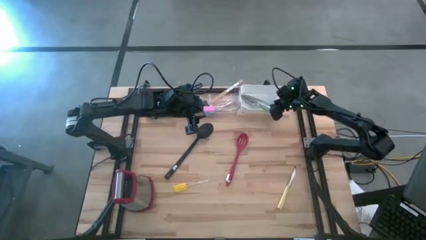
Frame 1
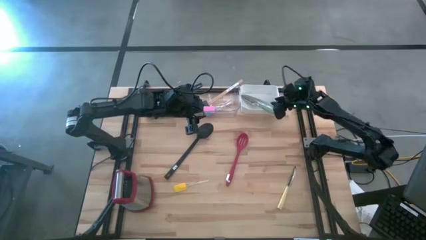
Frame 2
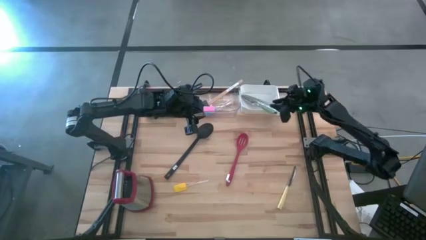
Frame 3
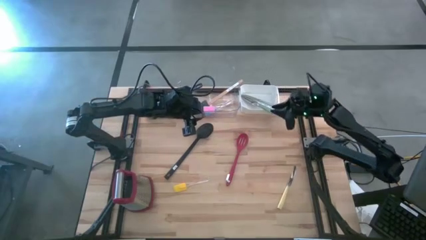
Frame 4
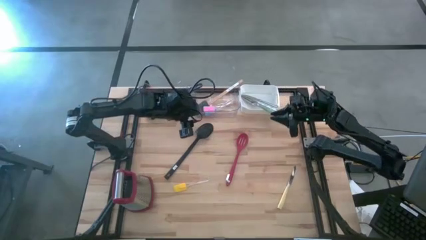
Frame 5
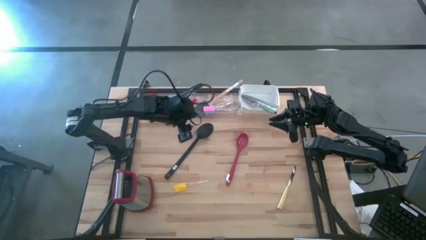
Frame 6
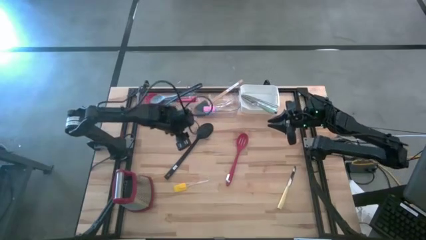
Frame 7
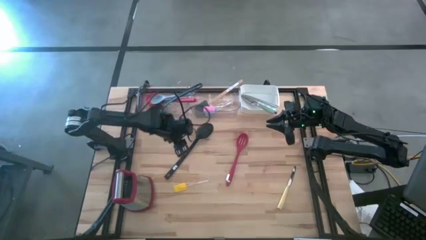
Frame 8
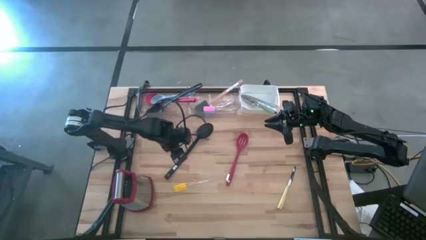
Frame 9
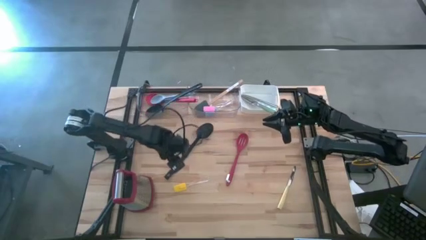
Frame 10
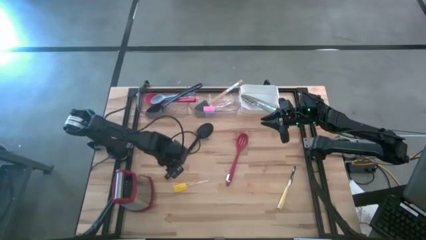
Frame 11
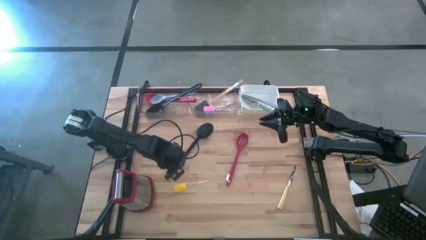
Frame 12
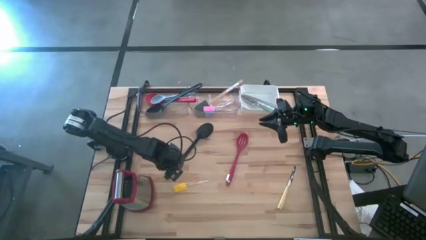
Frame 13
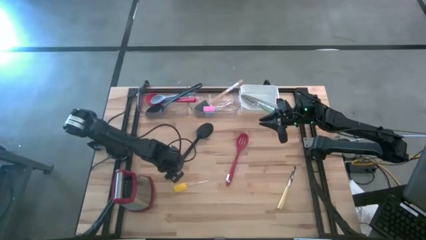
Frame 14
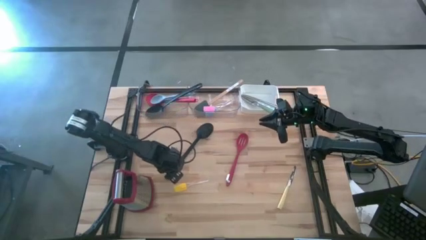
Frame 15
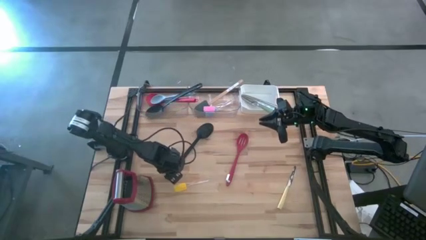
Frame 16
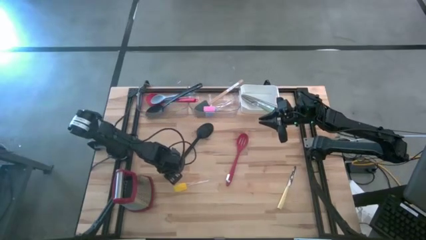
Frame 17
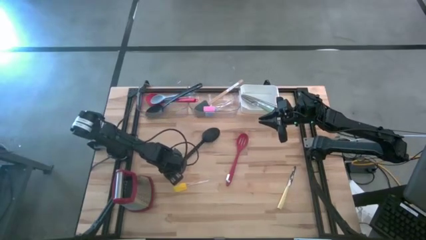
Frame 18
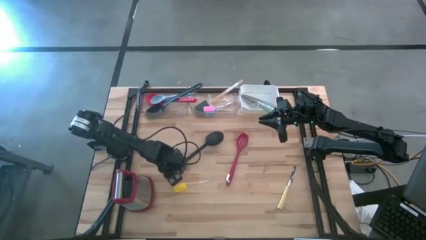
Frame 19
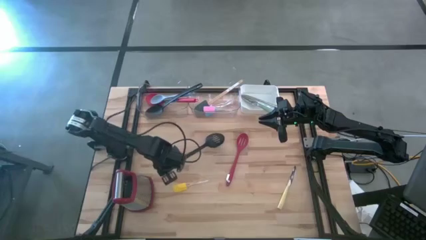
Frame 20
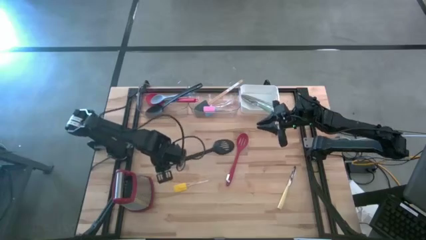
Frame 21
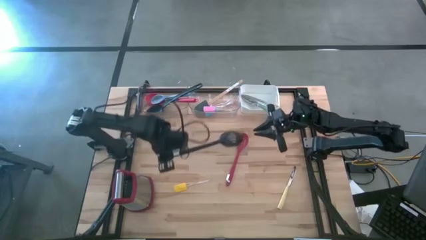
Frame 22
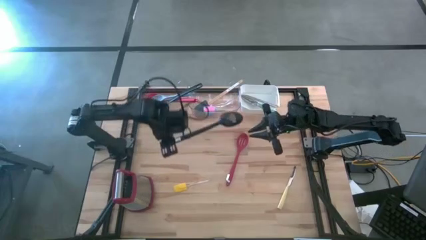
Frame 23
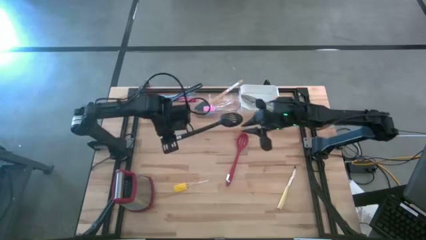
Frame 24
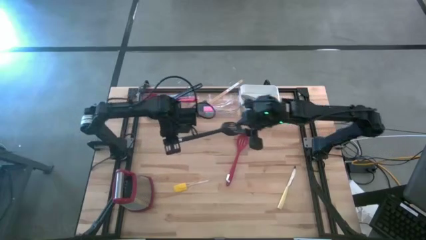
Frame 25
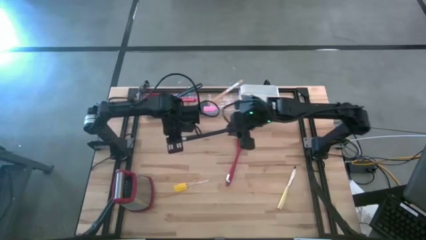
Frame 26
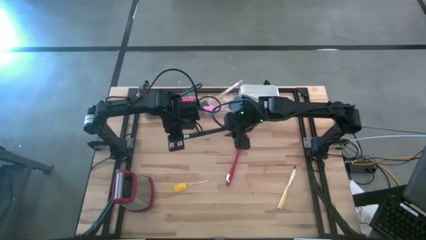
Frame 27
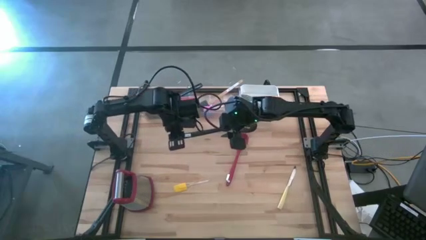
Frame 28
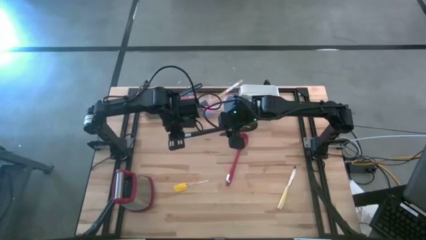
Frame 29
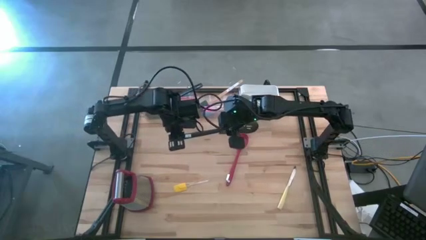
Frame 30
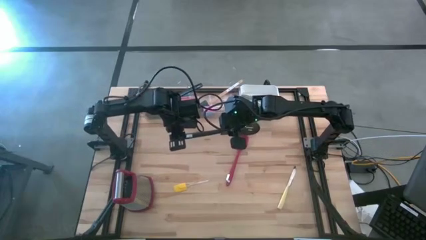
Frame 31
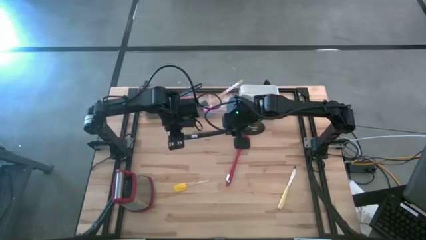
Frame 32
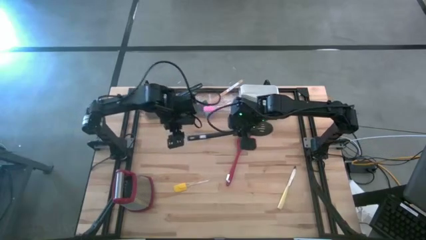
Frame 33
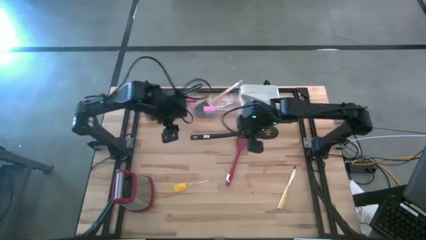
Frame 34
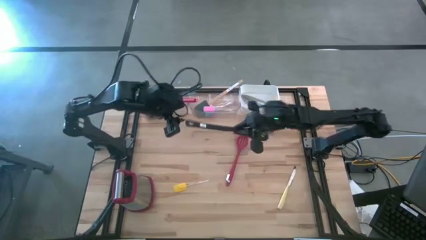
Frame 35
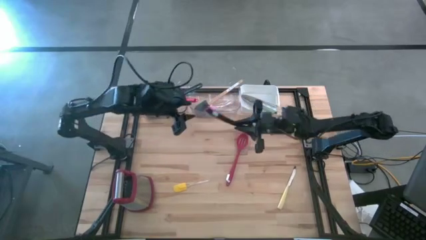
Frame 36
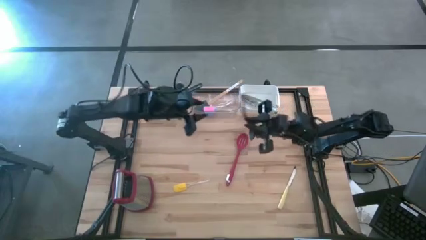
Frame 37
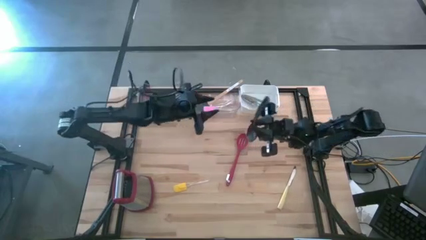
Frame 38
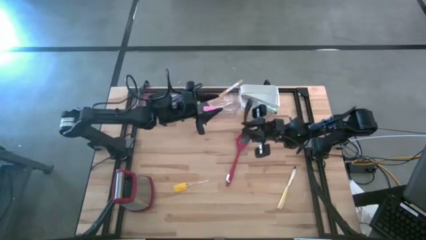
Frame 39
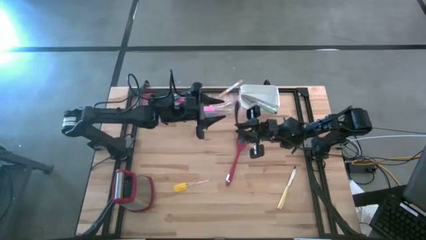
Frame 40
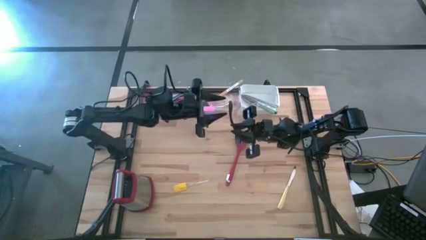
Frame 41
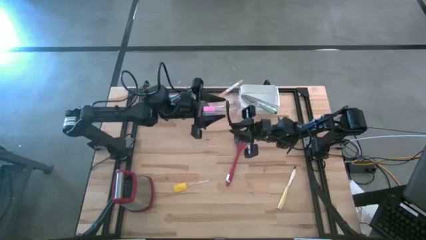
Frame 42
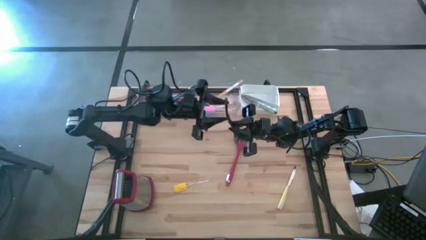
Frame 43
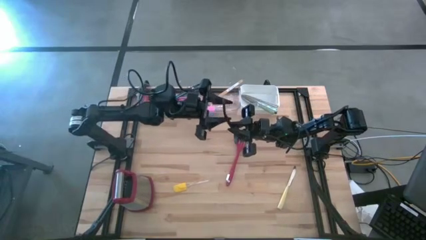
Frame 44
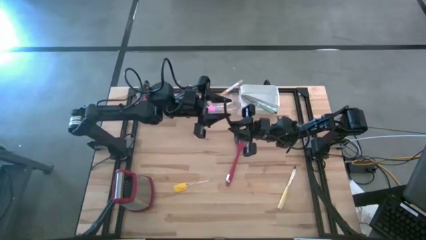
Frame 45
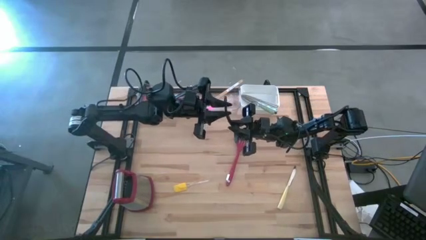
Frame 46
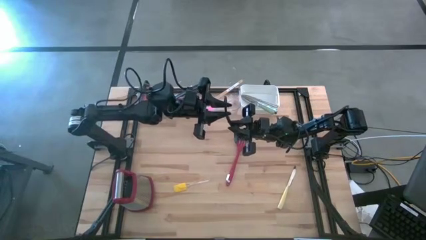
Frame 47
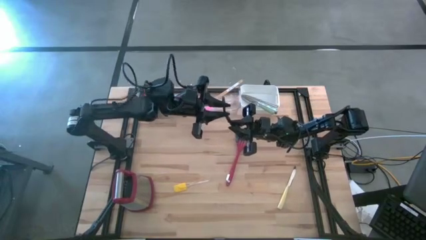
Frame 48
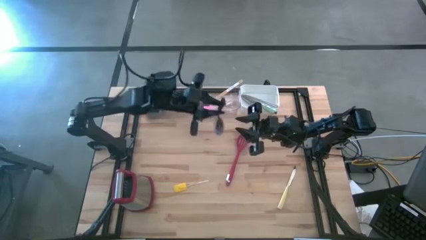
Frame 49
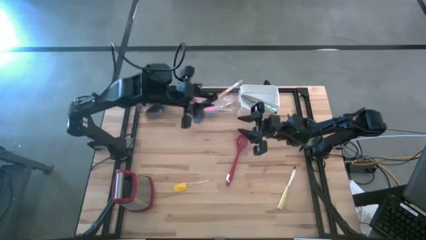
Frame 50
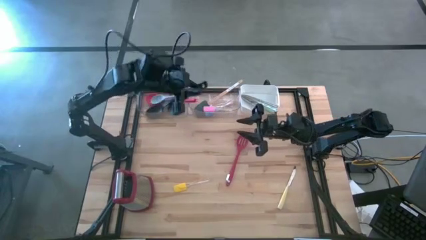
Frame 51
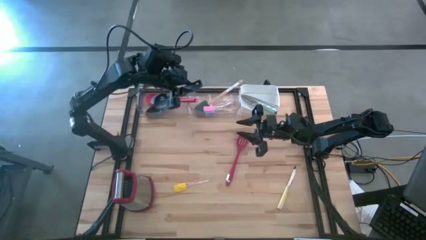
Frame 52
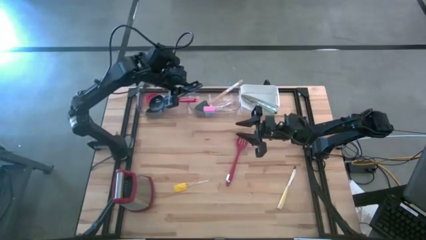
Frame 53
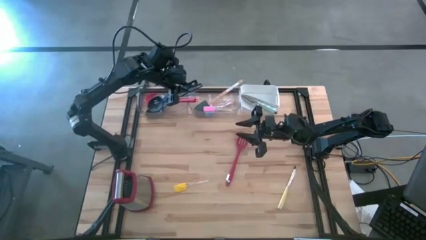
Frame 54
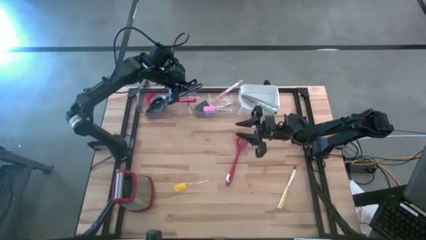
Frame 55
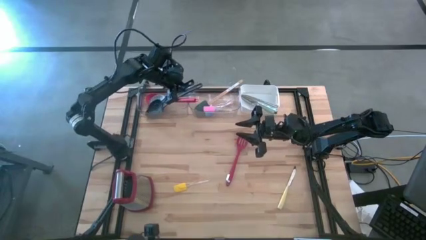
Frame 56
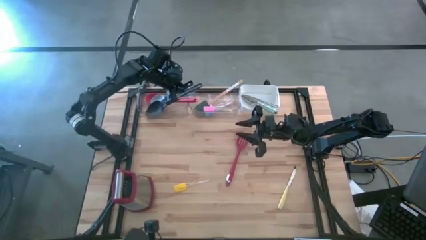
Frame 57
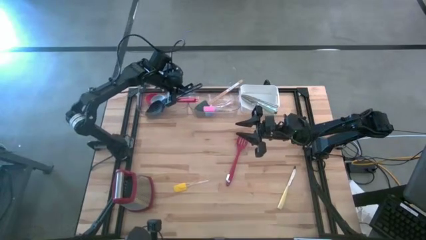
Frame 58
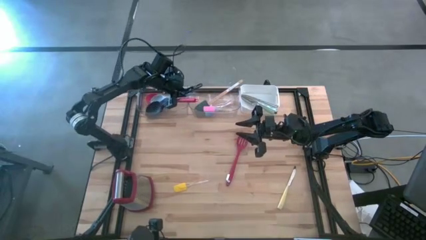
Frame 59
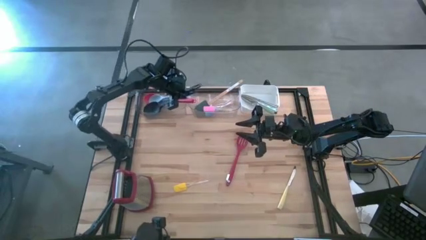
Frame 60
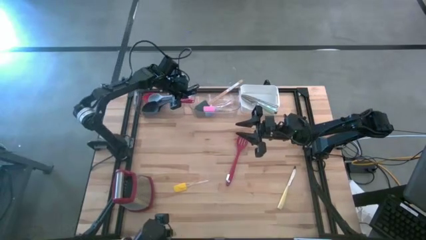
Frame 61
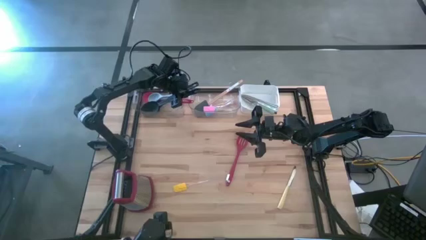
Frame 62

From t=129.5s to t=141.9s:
Task: Pick & Place Kitchen Items
Put the black serving spoon into the left transparent bin

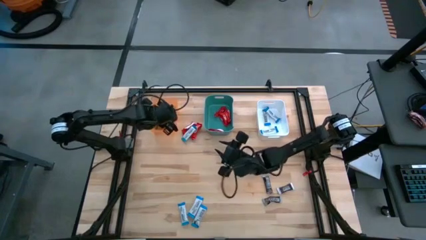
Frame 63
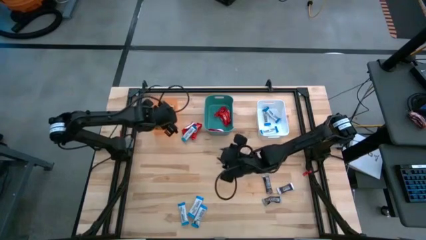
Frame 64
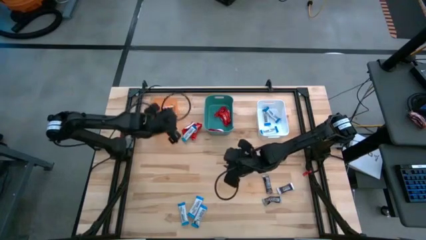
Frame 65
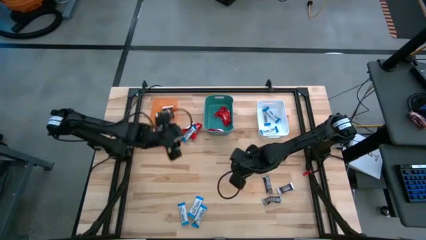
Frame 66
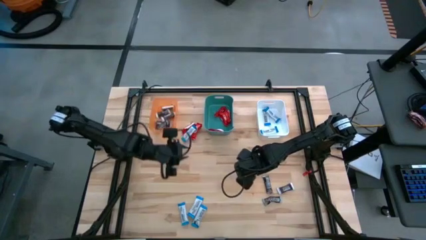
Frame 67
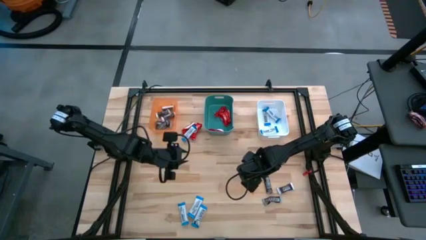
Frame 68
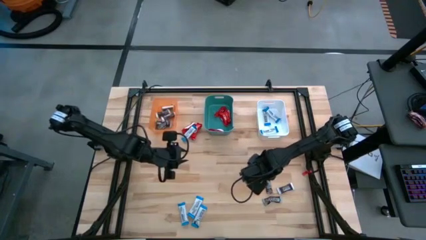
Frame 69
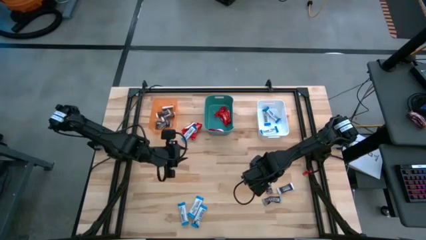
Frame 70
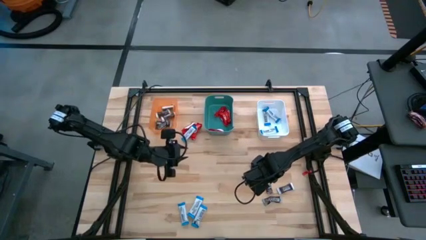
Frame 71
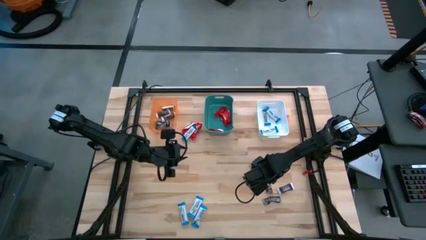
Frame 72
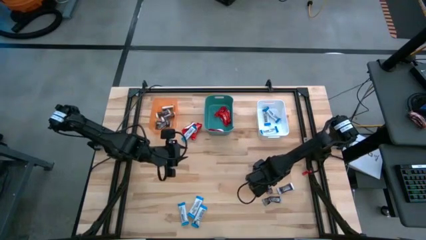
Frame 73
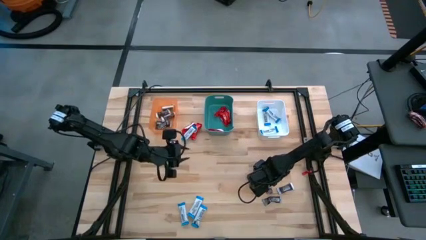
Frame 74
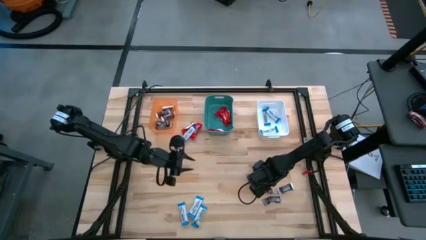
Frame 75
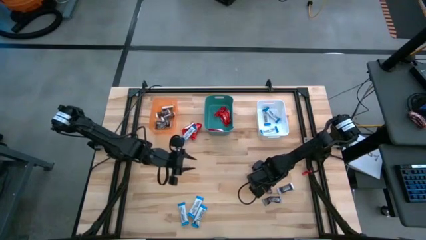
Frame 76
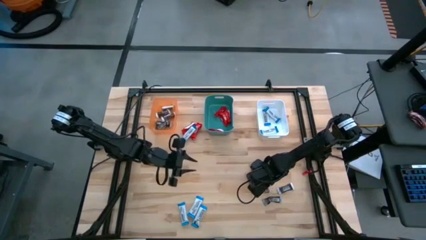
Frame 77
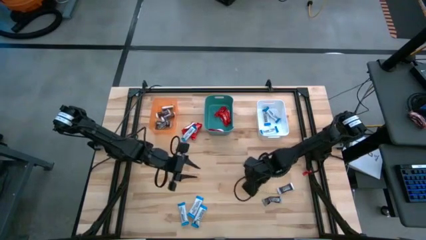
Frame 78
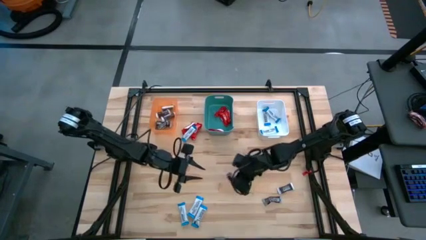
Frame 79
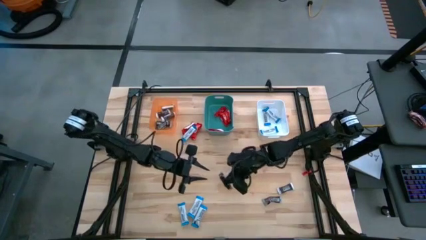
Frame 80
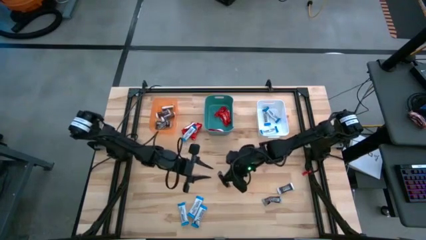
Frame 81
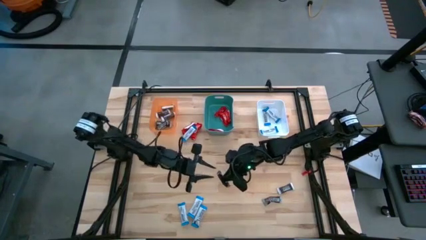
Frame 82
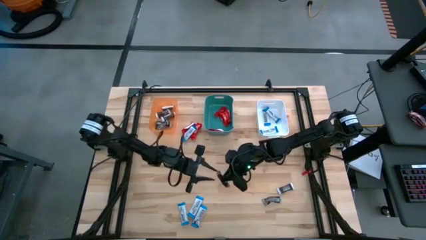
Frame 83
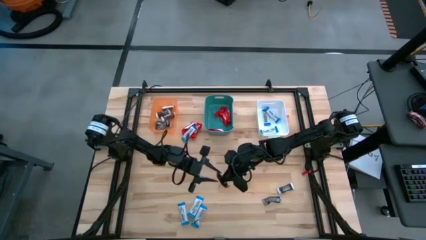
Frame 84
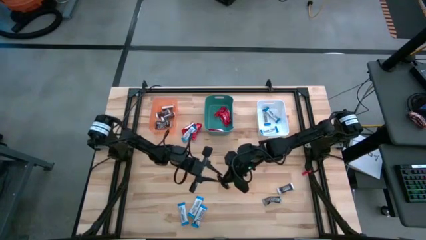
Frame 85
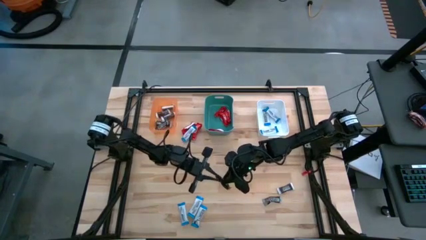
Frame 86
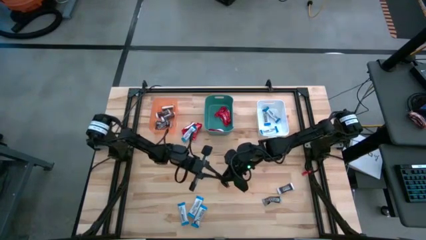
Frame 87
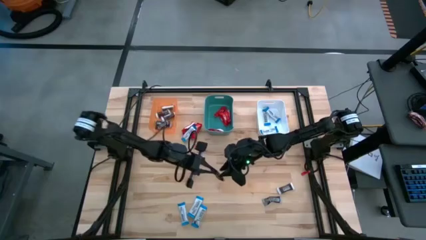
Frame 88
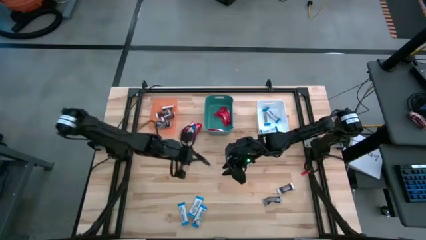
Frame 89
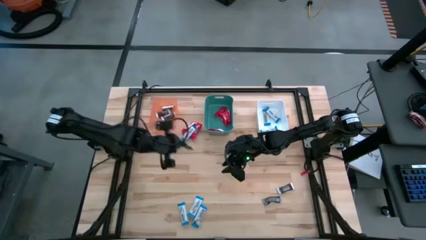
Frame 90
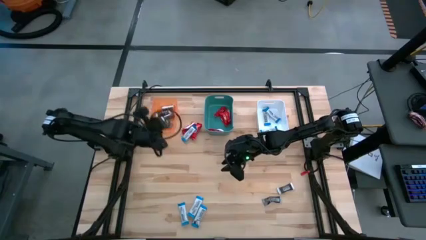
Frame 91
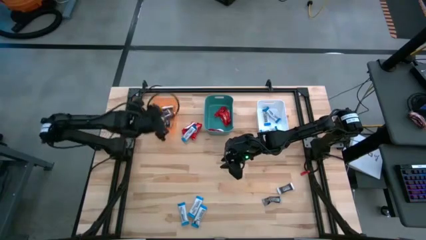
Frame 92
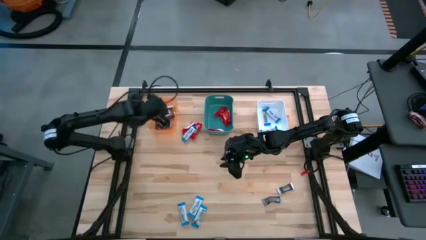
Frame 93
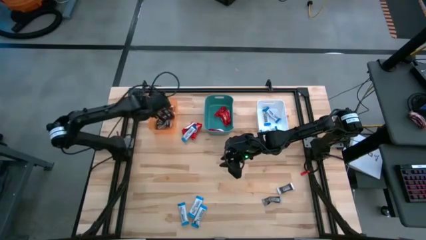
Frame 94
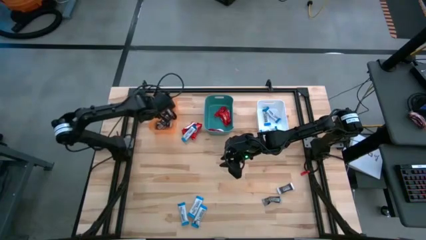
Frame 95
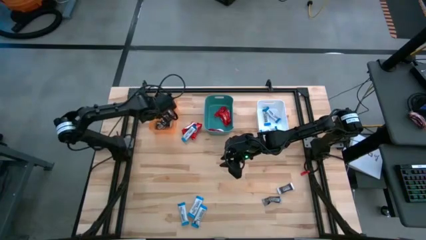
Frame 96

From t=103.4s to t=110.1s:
Task: Organize candy in baskets
Put the black chocolate bar into the orange bin
